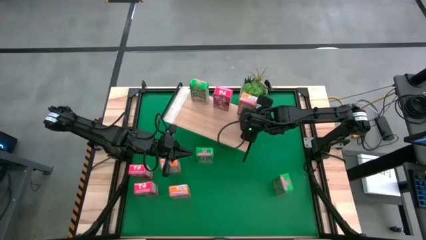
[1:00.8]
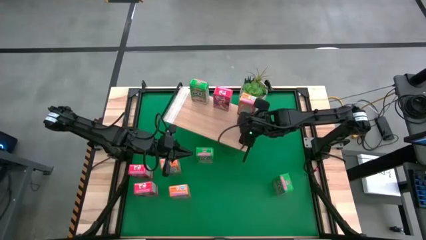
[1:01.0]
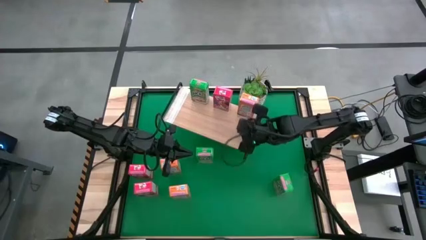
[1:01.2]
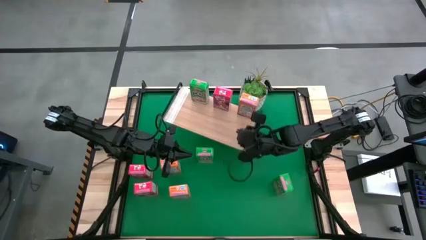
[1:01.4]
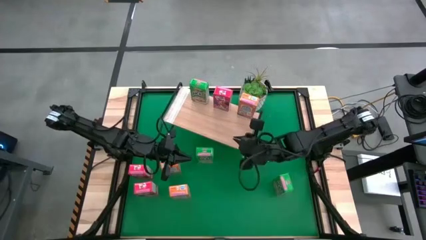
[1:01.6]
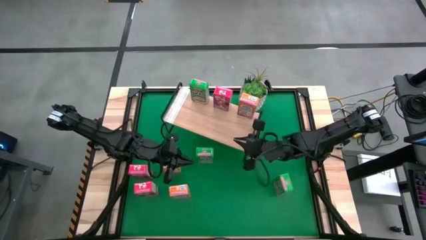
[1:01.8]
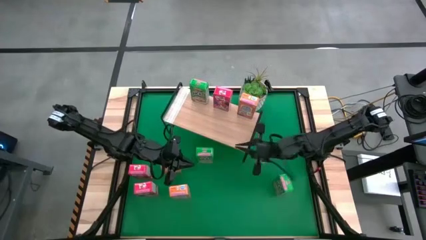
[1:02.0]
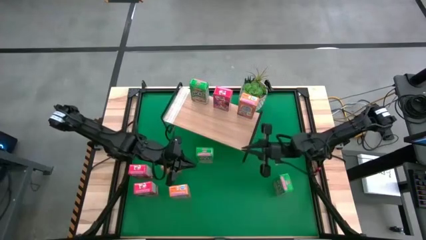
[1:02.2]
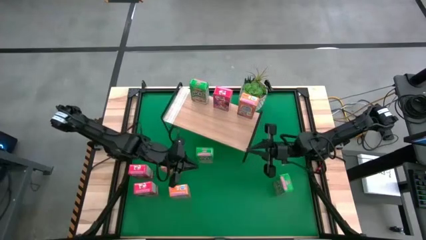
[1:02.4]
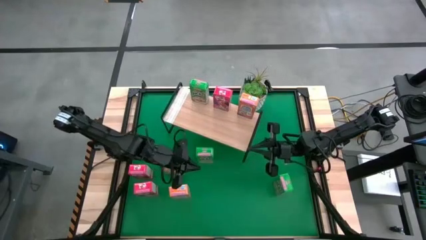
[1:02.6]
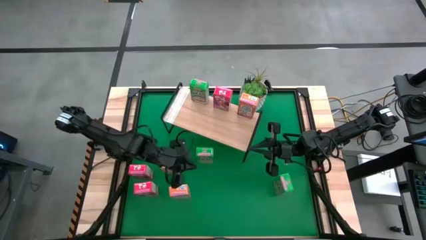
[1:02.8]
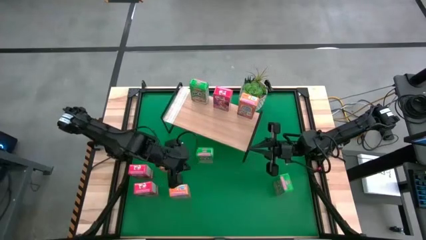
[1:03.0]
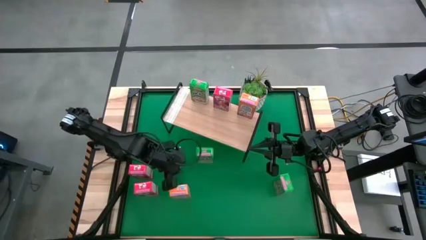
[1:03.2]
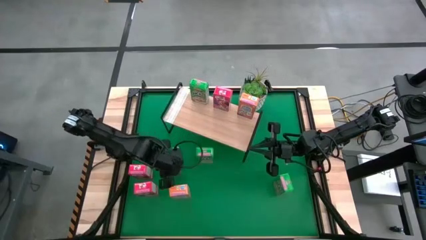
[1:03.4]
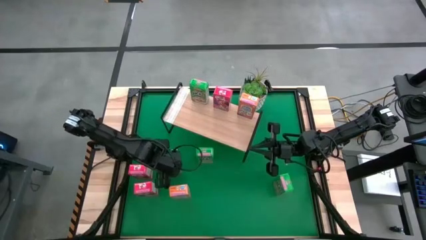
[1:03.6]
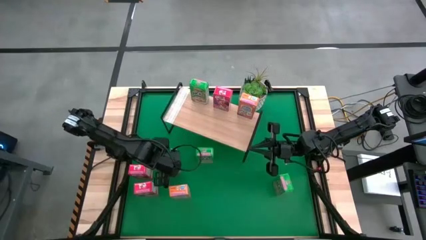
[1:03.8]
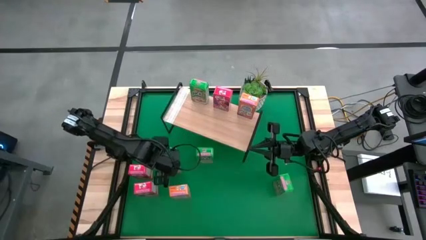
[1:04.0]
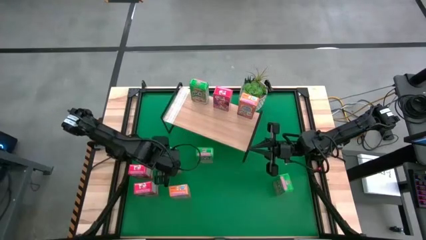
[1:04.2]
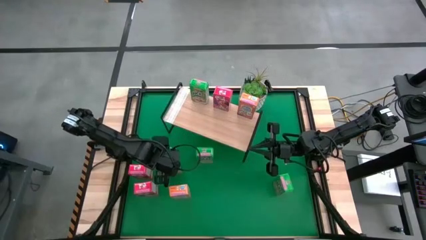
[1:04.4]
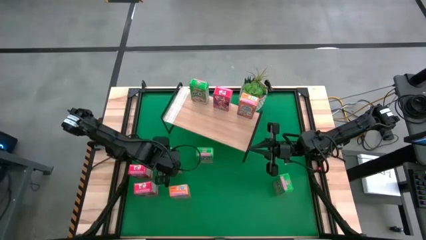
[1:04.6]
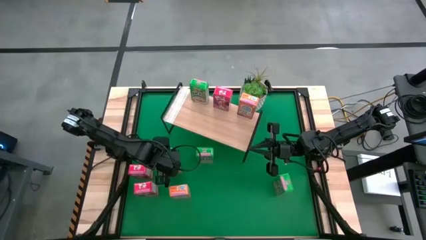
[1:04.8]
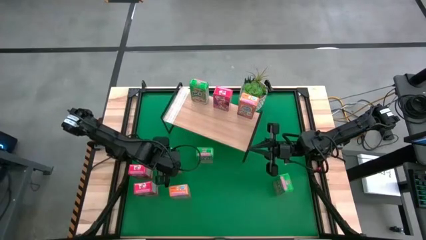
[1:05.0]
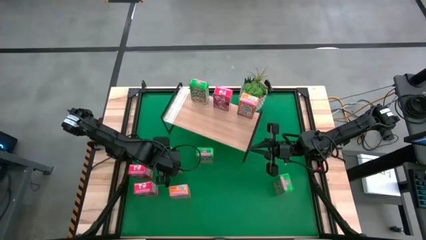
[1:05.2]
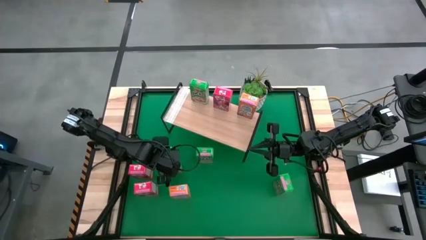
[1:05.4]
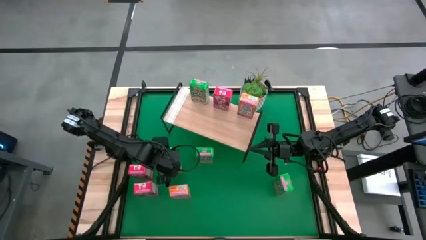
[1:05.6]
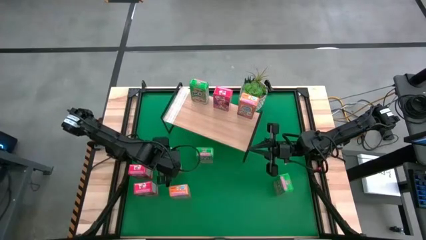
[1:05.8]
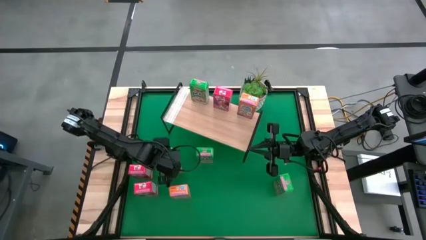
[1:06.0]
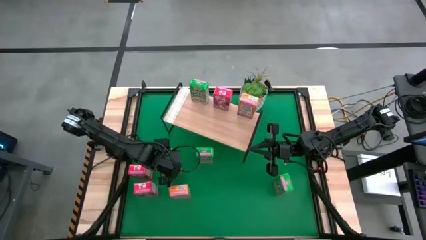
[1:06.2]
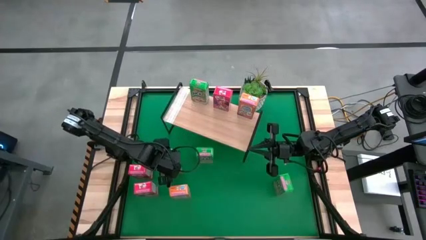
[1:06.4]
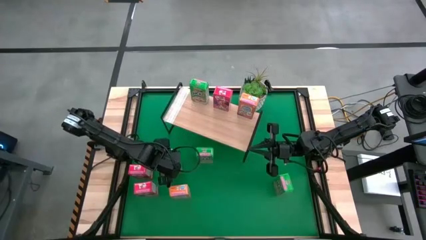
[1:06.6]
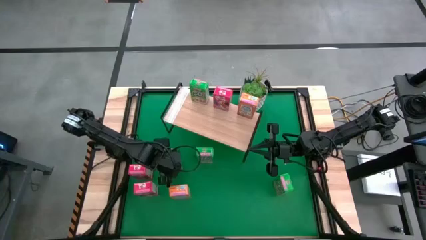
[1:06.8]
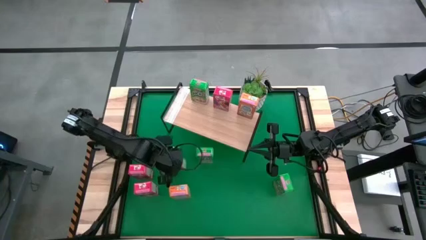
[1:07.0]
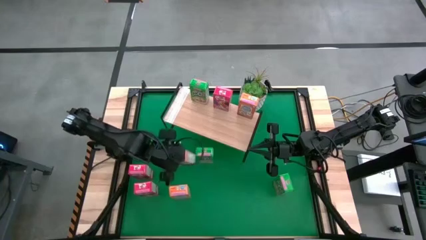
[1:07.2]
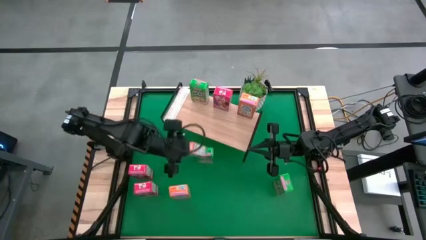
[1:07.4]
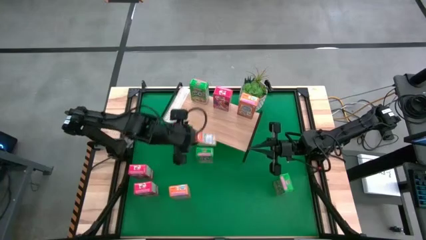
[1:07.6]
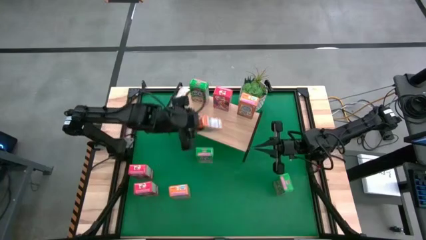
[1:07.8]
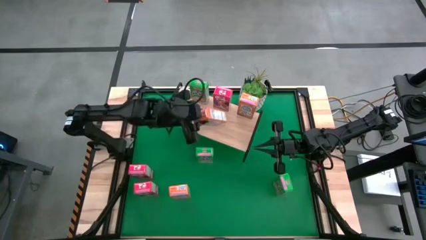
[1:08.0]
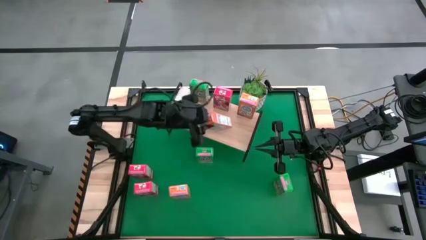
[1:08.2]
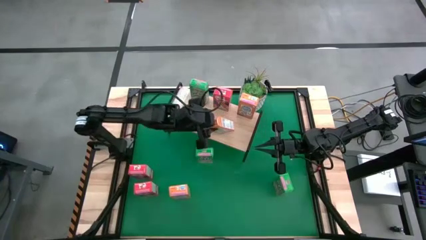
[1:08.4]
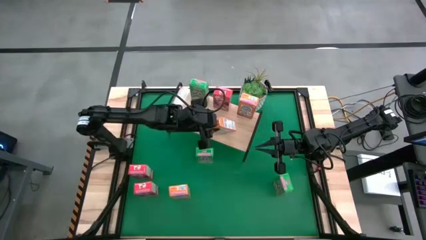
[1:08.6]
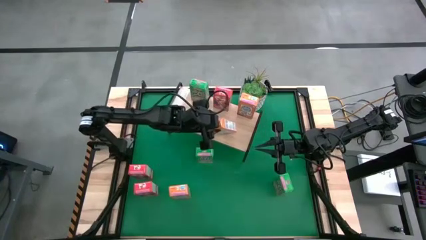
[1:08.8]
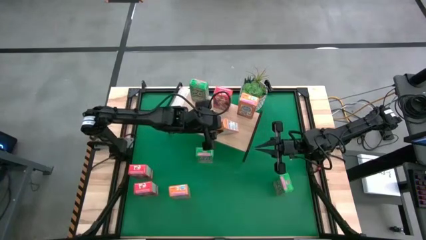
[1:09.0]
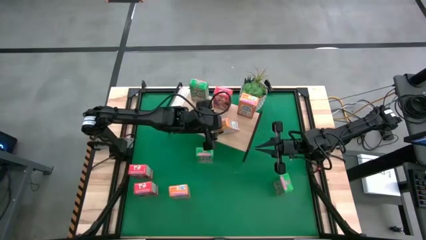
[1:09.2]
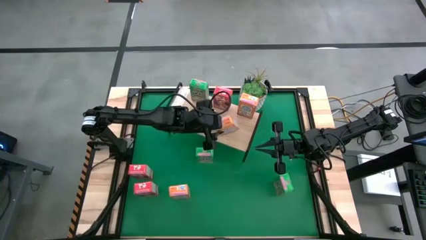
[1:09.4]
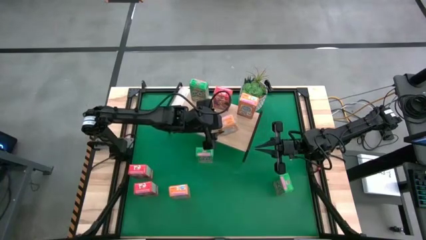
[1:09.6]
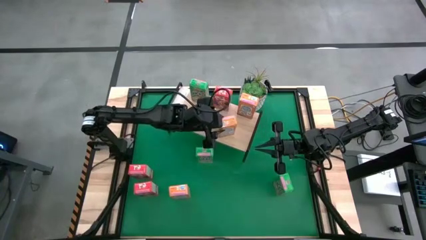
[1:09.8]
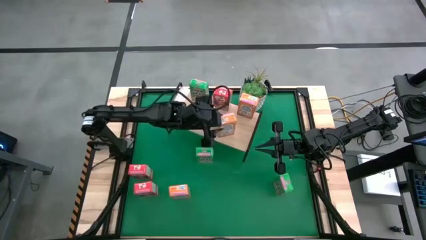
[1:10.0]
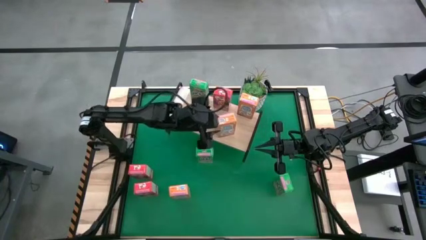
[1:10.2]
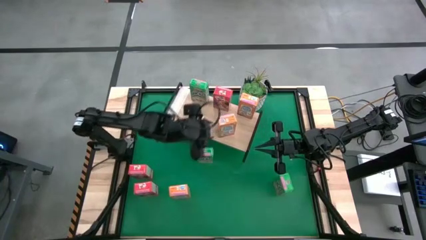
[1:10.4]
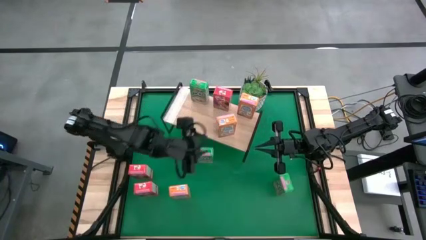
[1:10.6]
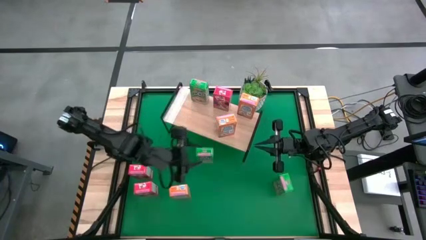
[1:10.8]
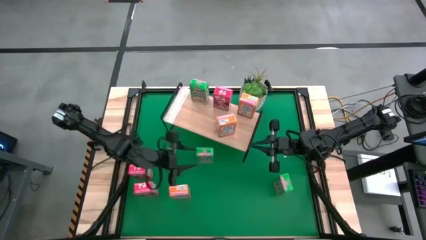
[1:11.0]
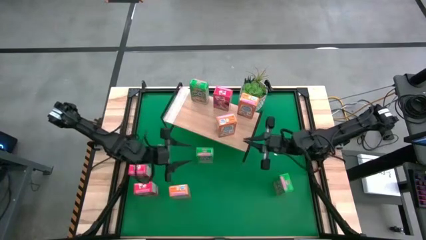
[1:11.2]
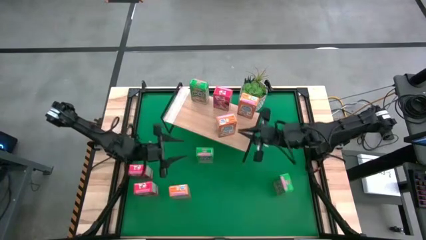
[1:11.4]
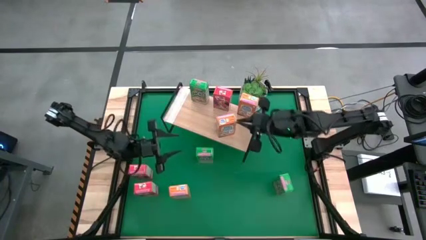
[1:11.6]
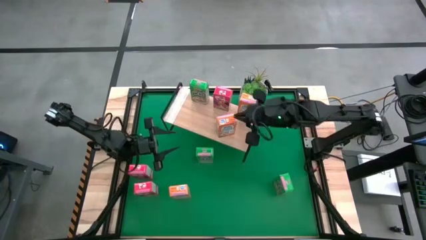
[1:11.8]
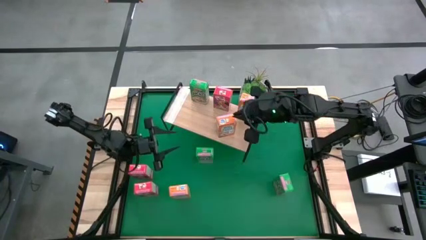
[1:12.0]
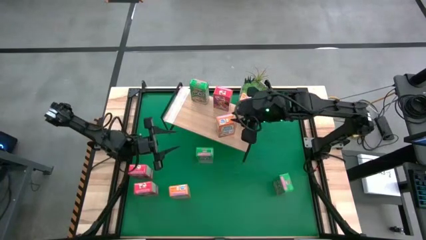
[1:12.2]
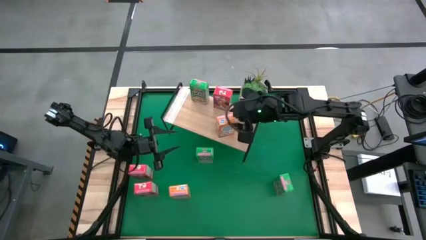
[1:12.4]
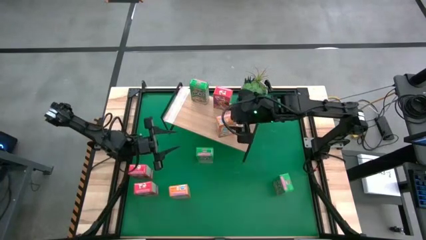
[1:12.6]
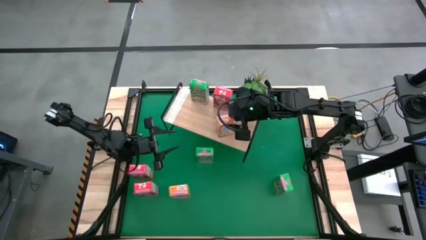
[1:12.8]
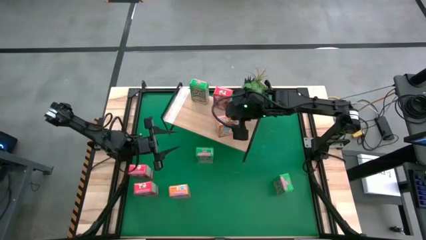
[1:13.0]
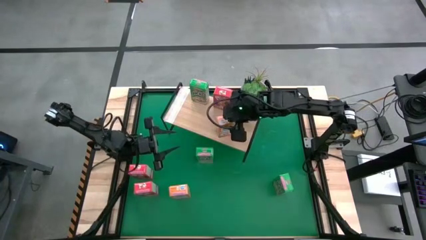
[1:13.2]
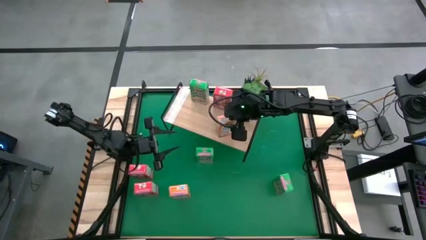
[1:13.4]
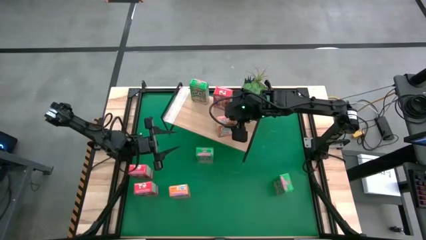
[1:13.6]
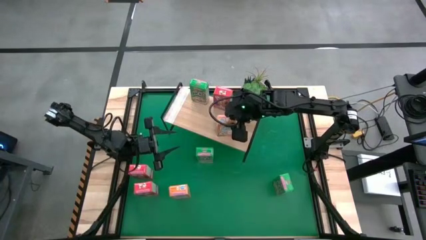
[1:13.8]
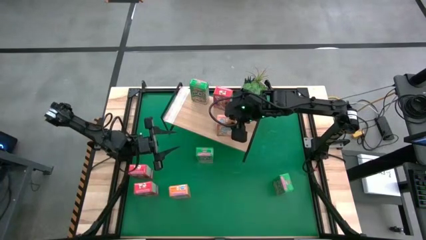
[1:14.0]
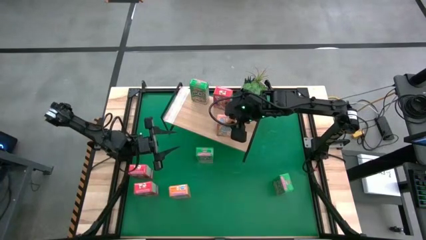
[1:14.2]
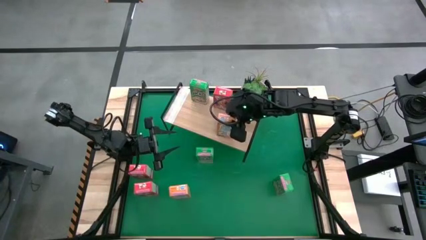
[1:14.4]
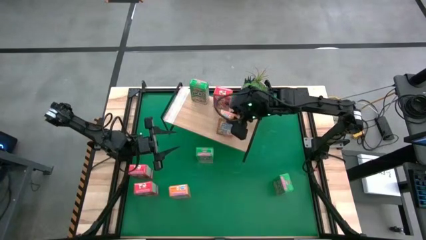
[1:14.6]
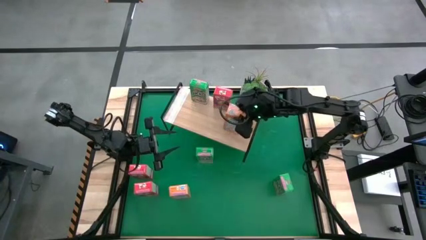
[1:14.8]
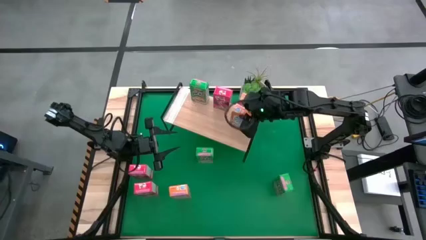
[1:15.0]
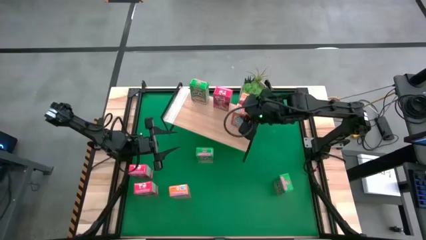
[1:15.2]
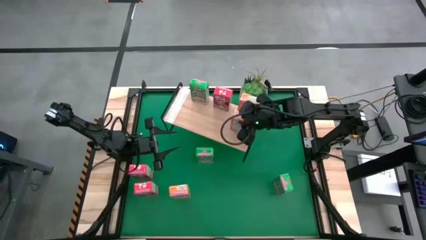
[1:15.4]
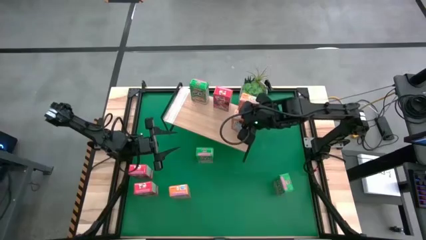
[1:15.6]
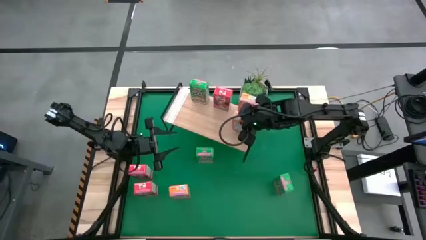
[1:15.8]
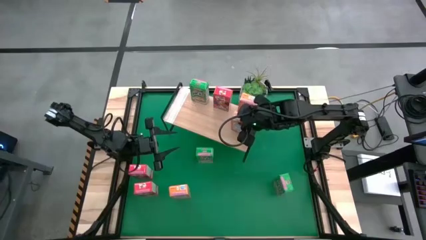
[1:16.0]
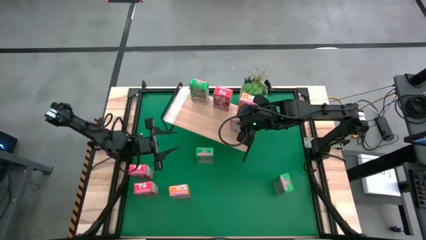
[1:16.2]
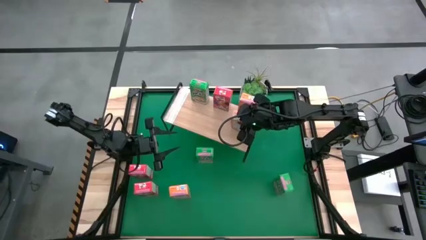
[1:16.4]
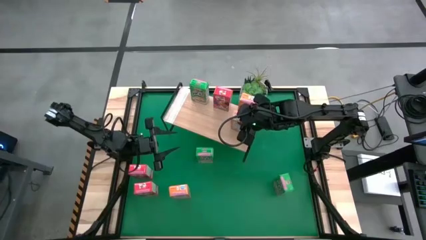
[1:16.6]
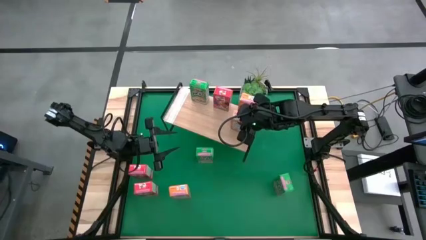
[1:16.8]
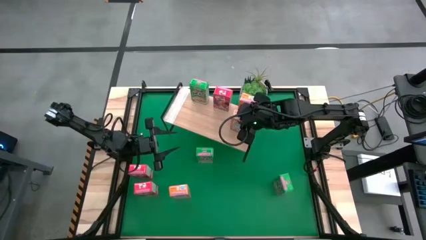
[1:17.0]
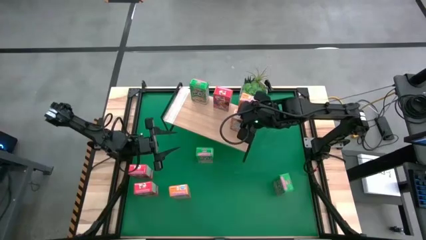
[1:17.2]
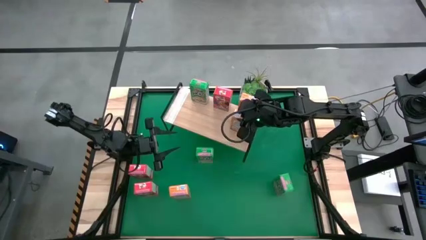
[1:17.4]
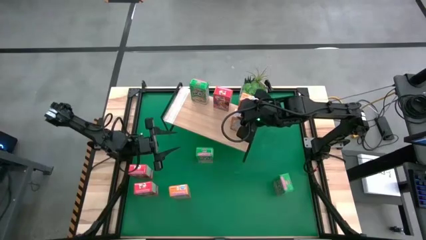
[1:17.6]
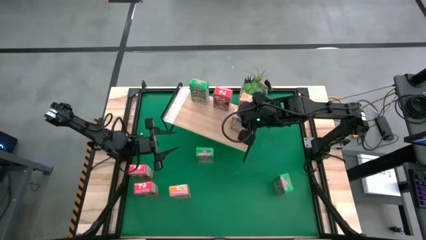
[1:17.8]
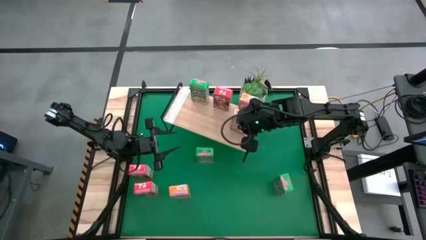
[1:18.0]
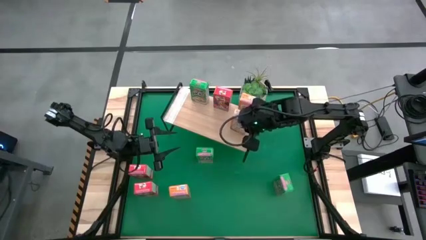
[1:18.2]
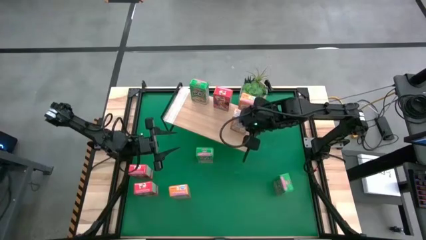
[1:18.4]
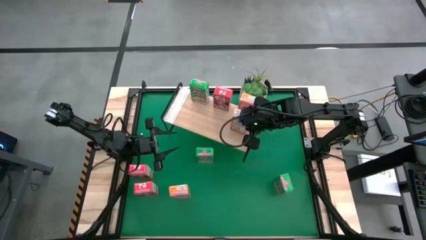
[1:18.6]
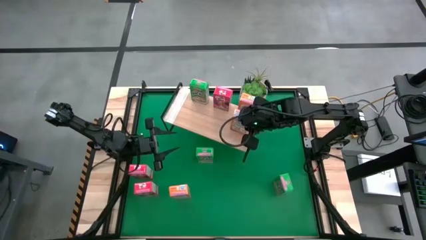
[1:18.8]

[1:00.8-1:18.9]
Task: Stack cereal on shelf
Put the top orange cereal box aligned with the other orange cereal box on the shelf
